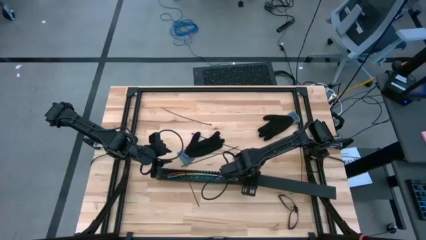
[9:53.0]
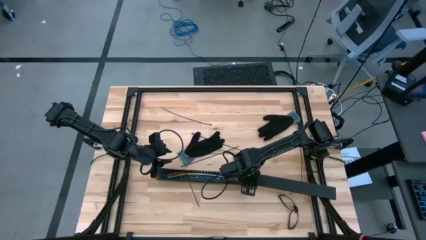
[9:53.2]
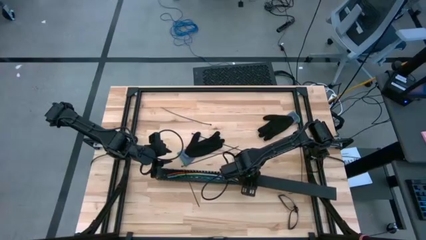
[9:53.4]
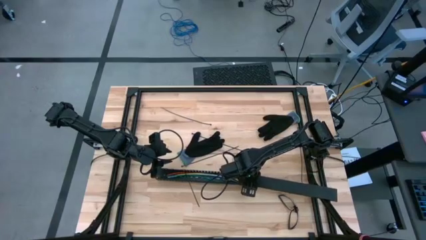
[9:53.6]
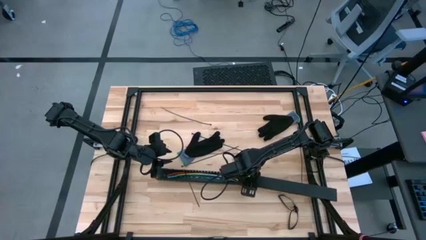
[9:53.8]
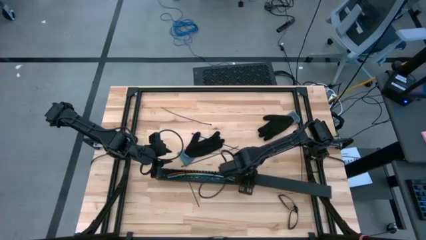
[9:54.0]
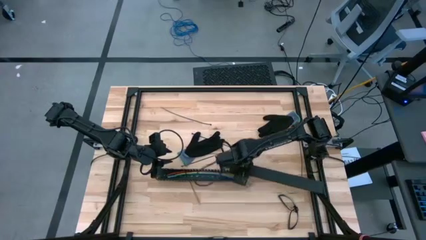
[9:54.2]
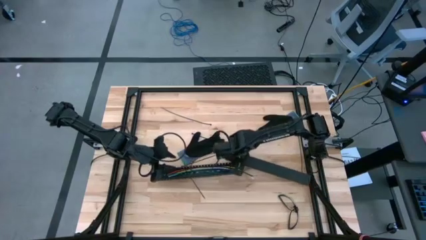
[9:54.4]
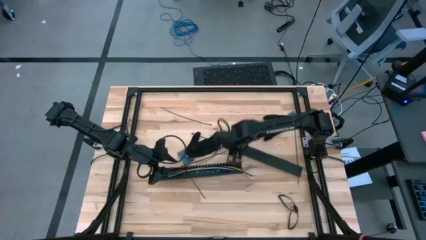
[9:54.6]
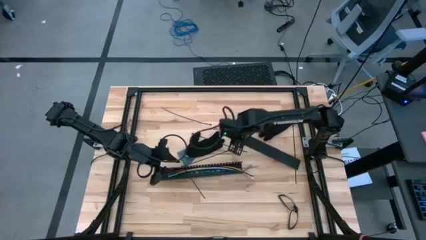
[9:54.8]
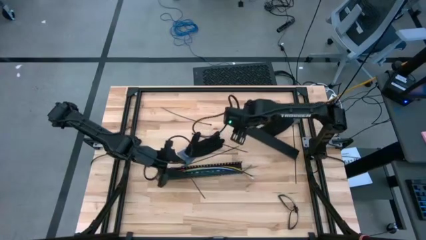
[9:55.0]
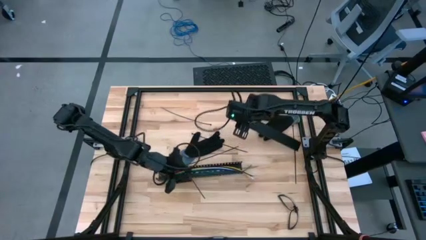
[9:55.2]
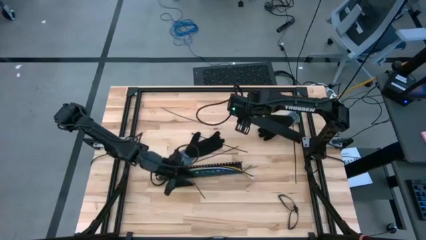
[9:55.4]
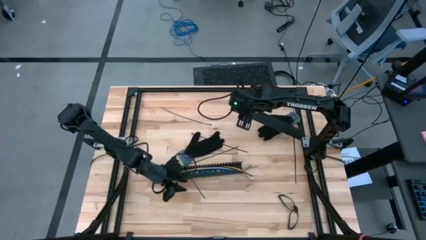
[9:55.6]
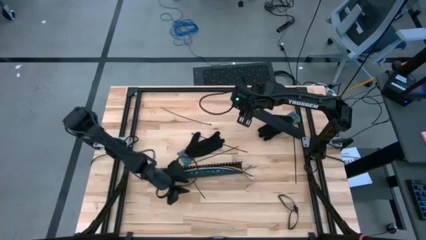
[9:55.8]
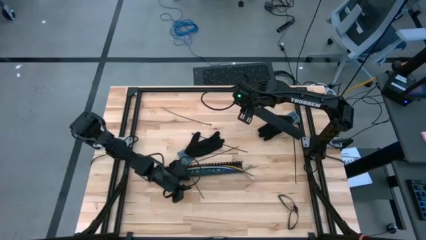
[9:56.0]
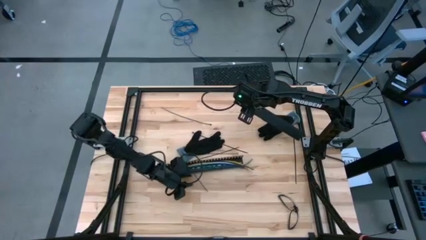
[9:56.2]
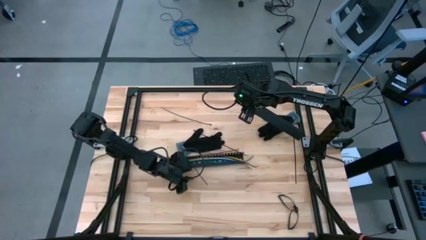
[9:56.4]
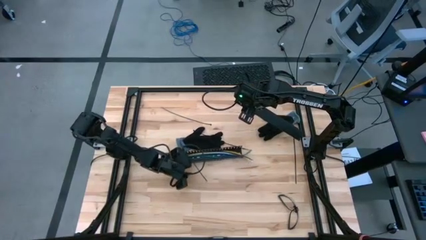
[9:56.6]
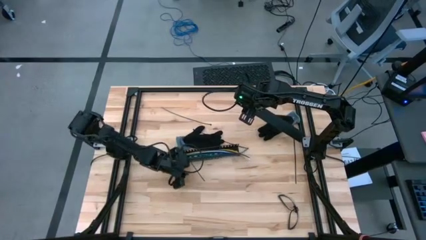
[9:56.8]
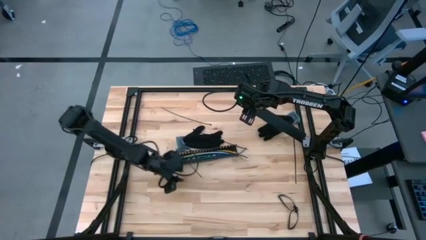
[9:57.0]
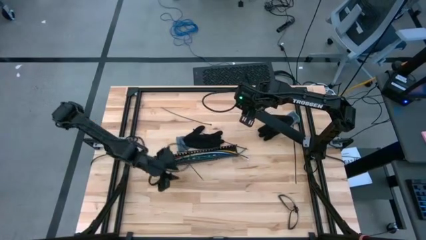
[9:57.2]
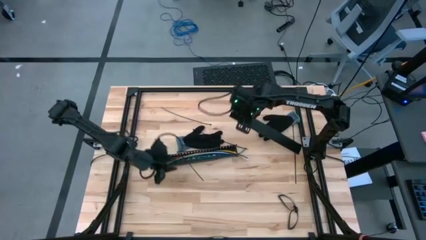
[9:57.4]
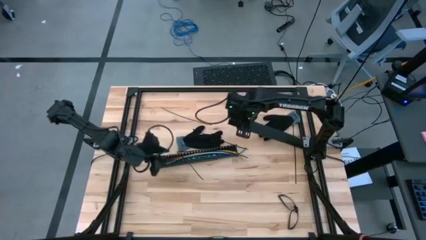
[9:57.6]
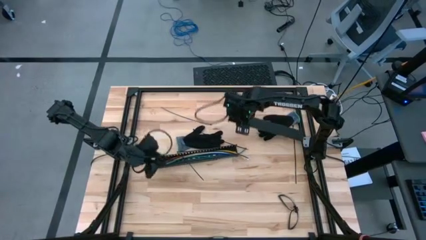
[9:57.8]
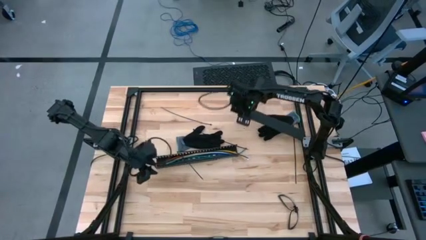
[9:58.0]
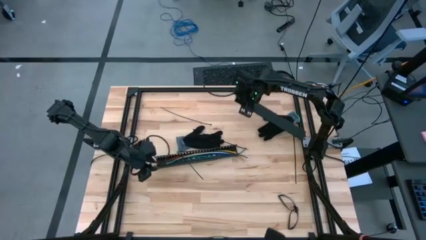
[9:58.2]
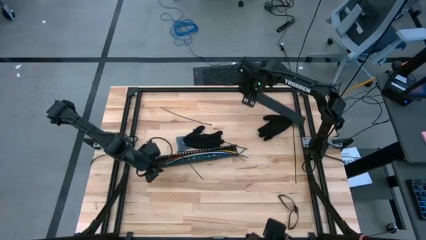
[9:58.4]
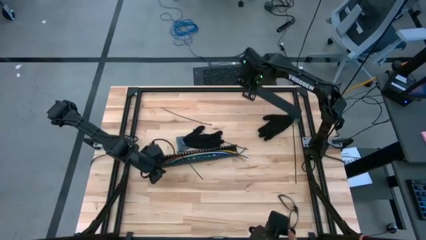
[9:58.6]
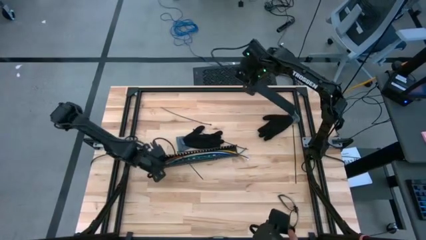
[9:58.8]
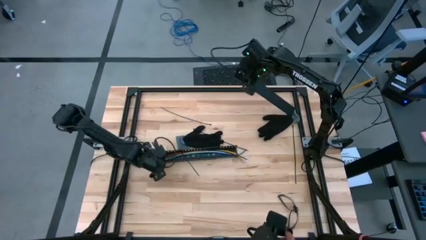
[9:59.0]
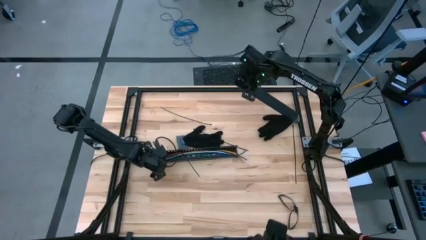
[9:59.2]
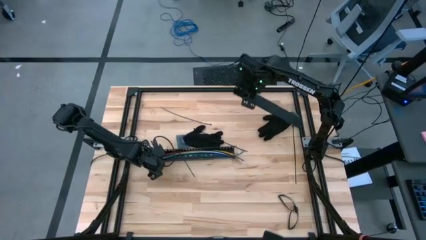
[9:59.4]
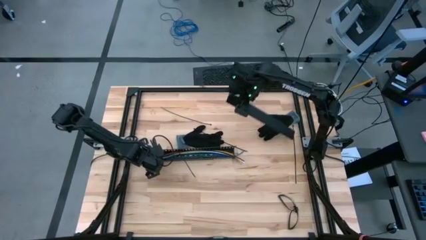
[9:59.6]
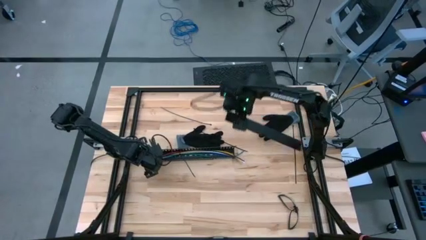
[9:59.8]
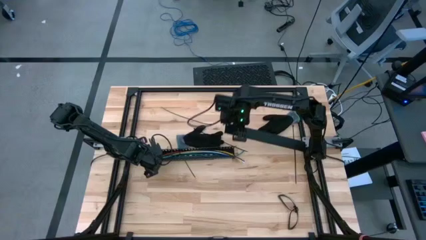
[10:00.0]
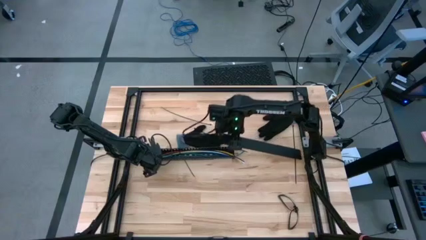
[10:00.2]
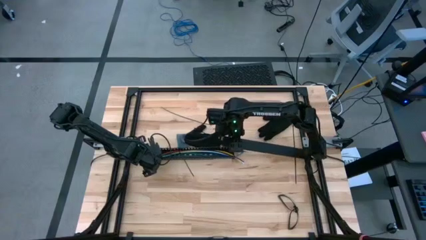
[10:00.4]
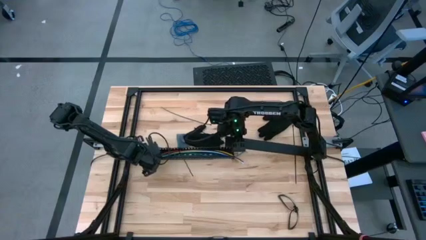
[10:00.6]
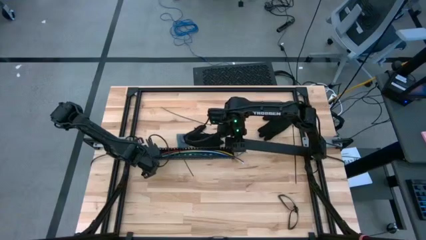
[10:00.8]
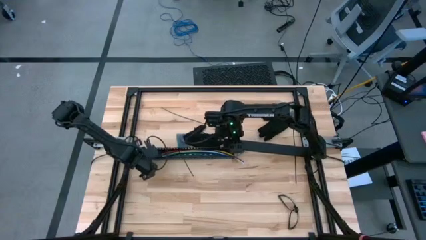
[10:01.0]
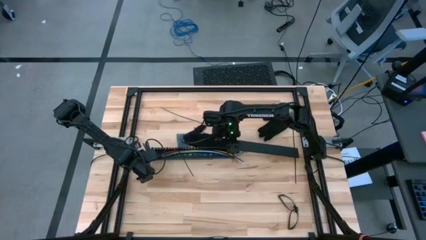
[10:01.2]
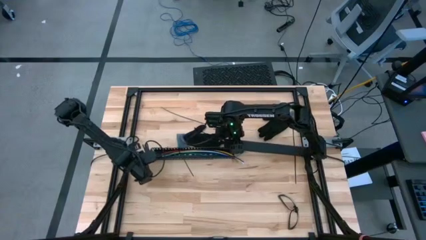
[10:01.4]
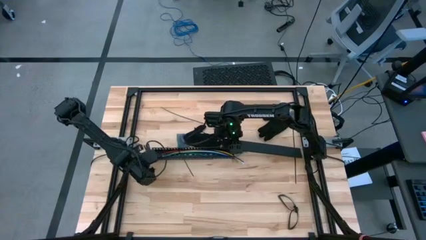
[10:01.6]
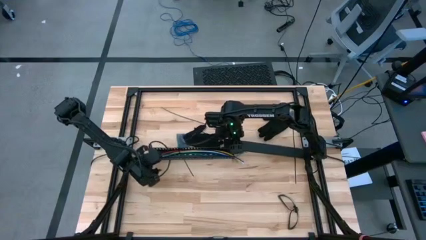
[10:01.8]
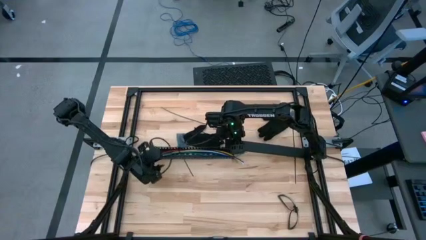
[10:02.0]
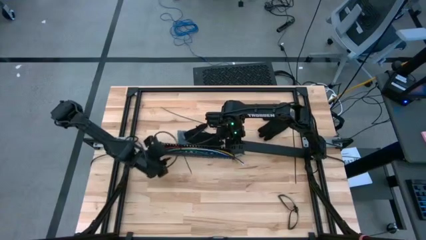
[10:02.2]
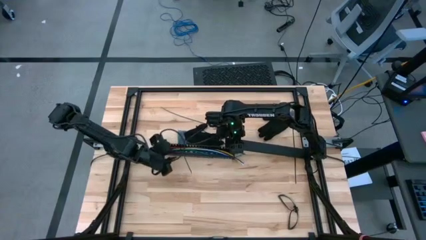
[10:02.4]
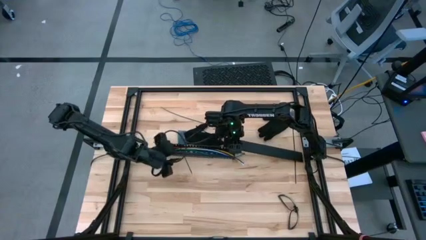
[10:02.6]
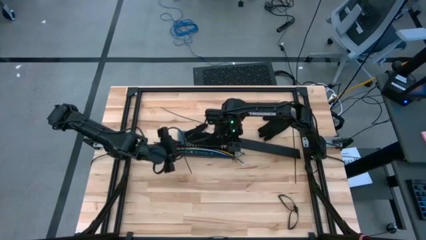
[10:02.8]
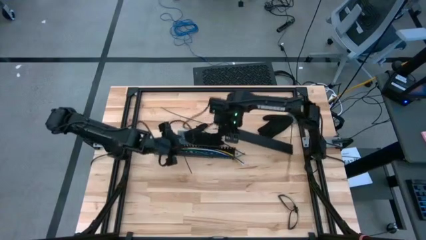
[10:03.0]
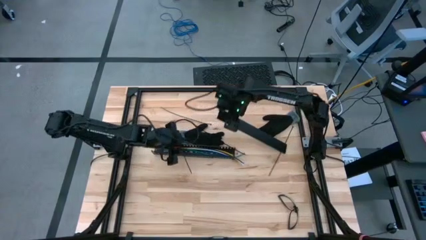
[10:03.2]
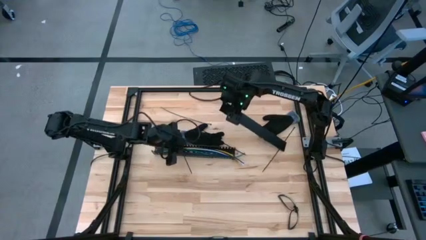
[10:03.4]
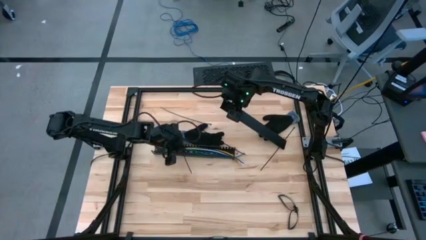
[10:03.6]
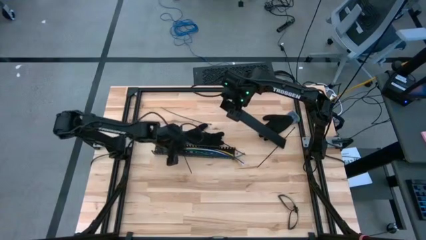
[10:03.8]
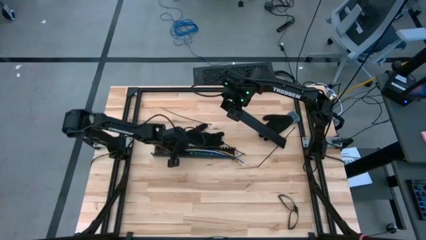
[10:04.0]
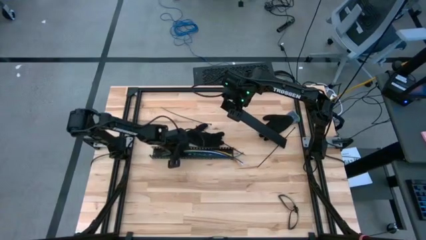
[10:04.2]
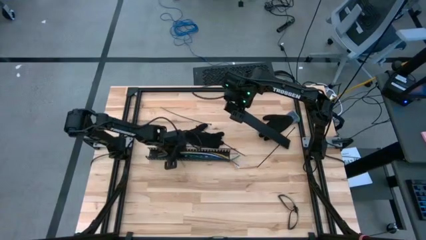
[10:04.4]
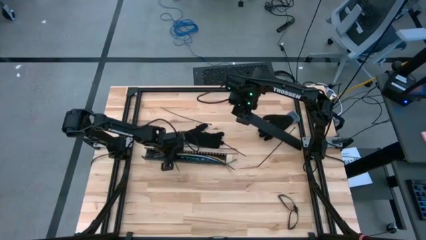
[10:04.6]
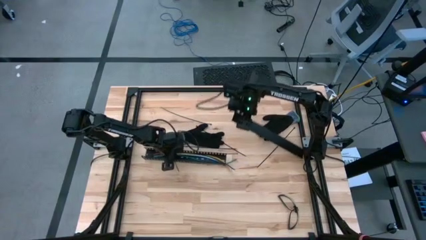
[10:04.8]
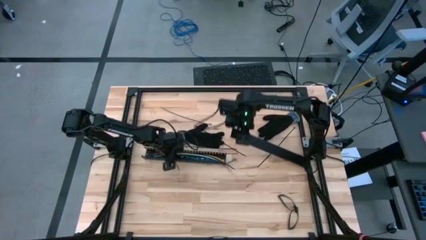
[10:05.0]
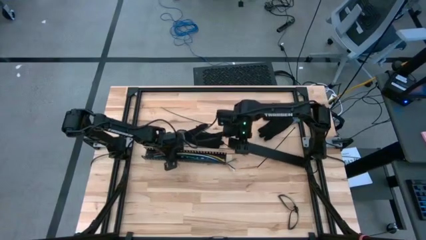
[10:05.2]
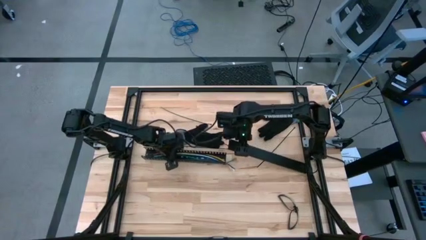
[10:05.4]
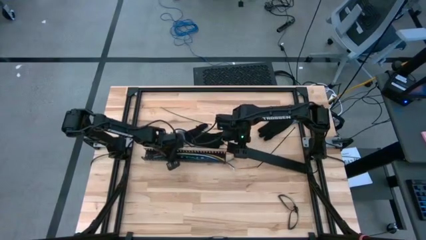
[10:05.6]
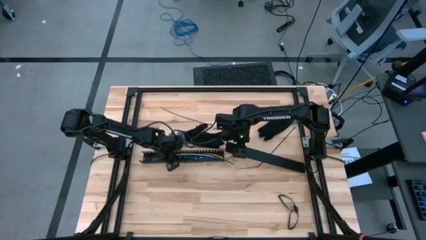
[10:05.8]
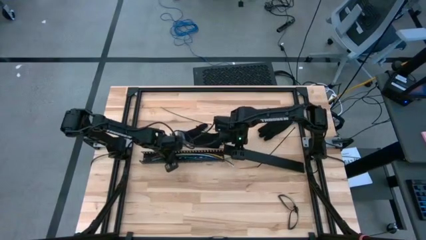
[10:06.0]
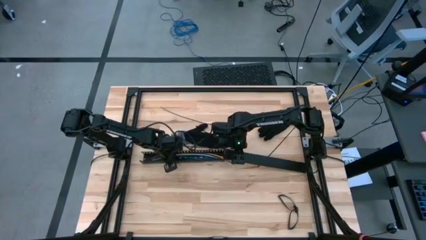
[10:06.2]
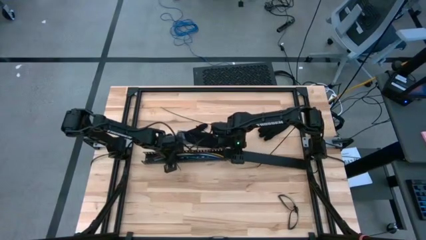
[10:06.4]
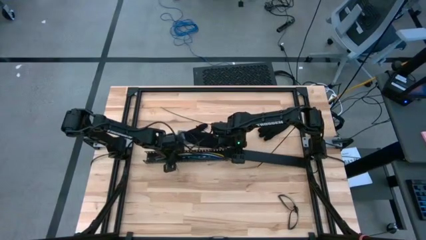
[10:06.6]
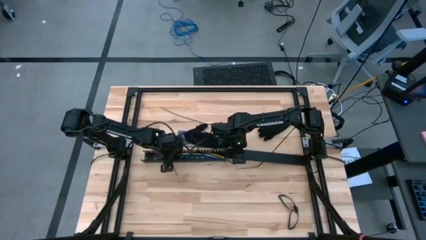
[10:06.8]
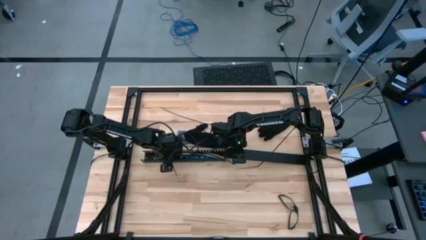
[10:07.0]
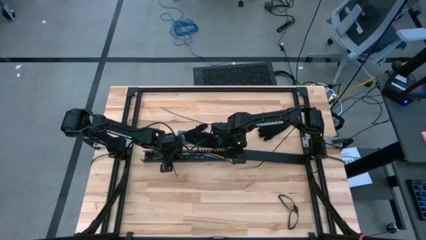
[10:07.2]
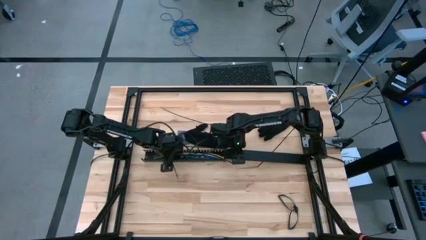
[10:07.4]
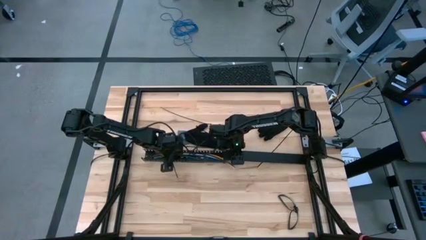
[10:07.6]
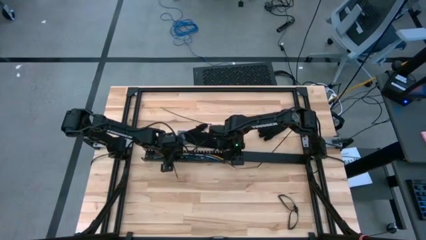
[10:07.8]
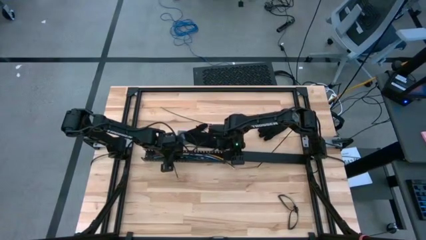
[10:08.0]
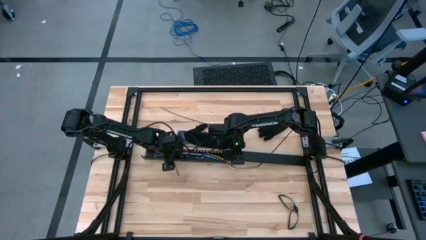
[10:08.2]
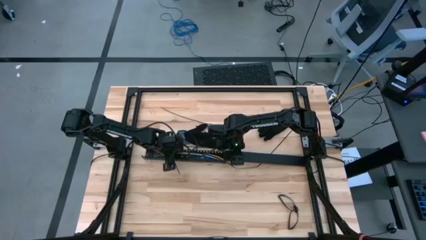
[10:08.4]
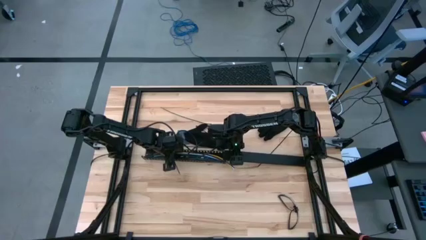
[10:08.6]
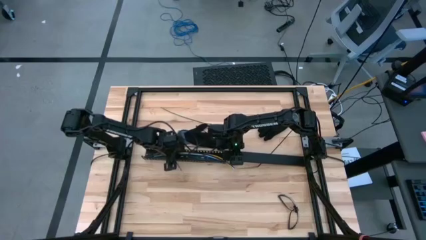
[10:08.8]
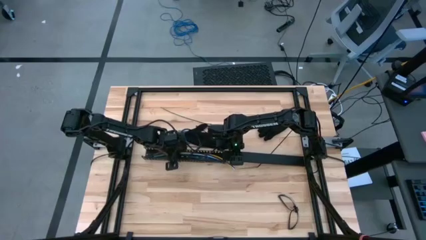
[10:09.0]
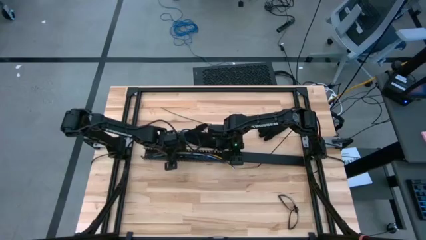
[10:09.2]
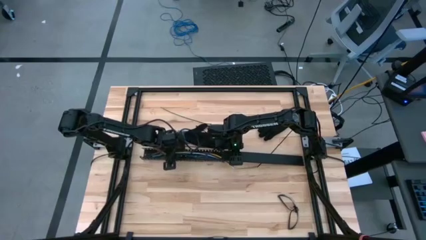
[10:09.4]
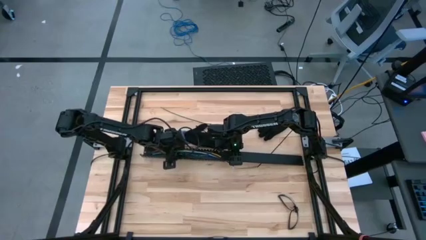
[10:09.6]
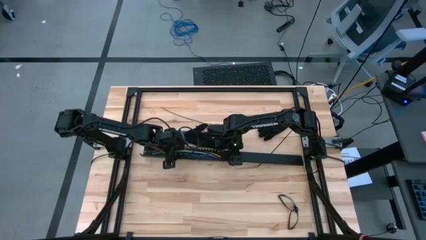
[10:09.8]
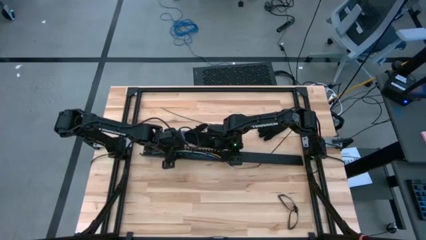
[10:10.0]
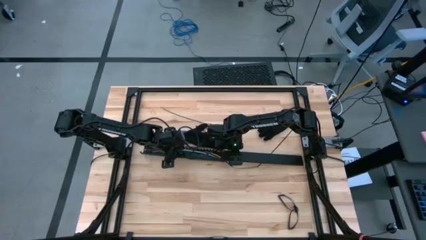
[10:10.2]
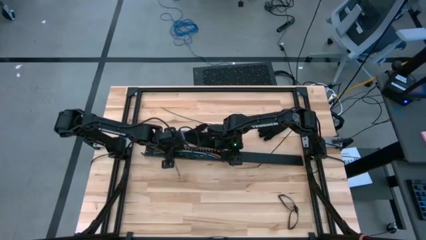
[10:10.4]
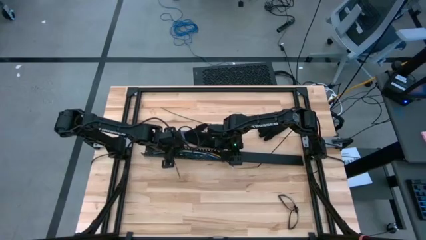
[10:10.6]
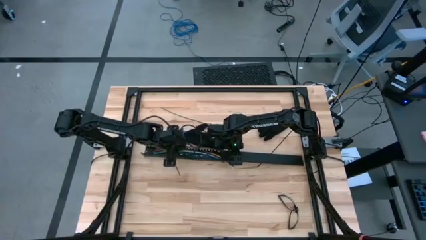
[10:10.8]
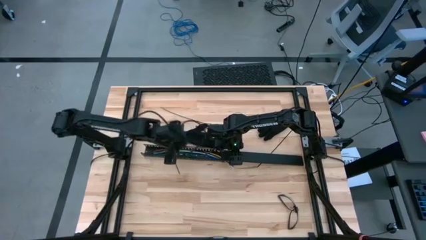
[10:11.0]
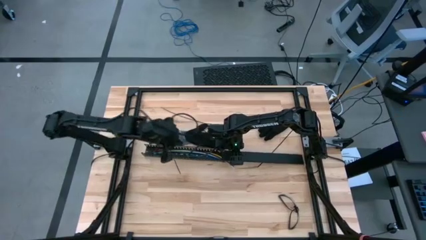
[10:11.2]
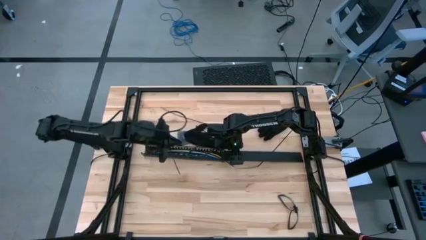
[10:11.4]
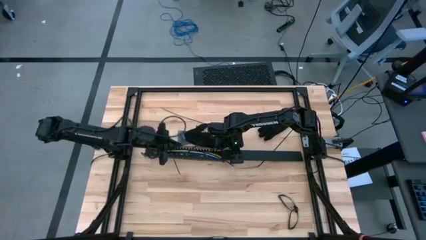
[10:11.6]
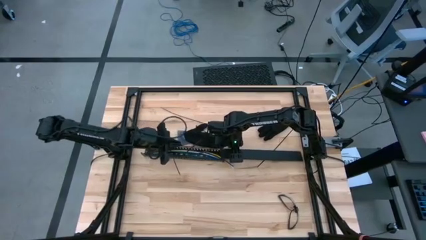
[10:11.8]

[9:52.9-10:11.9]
Task: Ziptie cables
Close the cable duct
